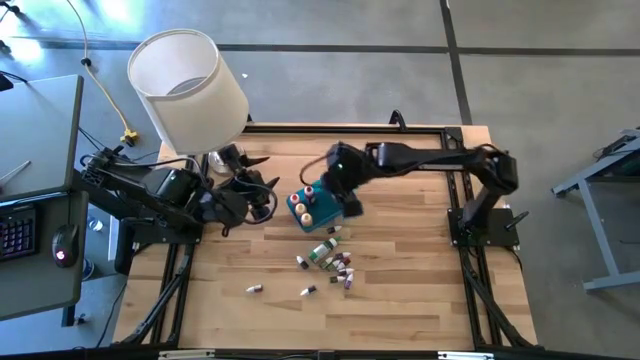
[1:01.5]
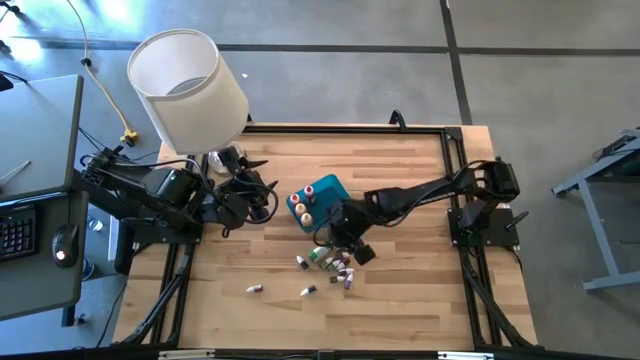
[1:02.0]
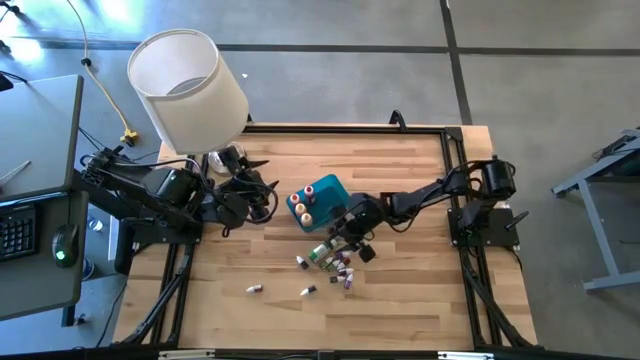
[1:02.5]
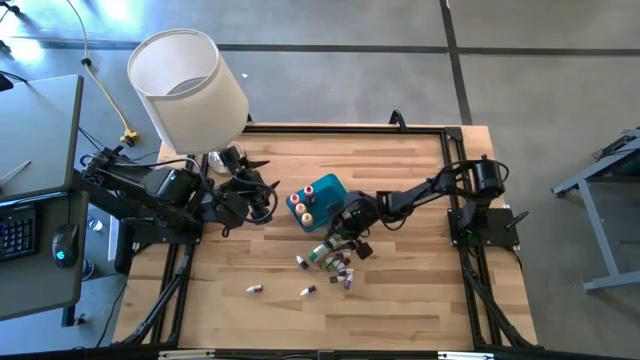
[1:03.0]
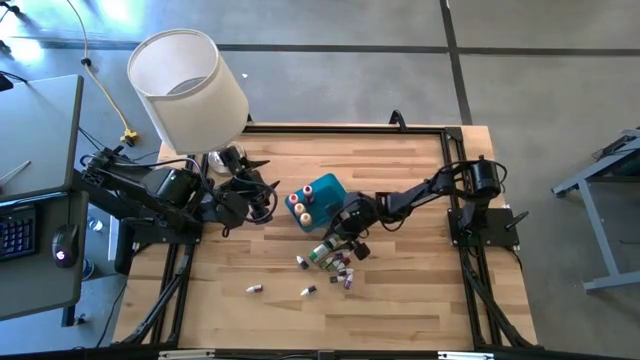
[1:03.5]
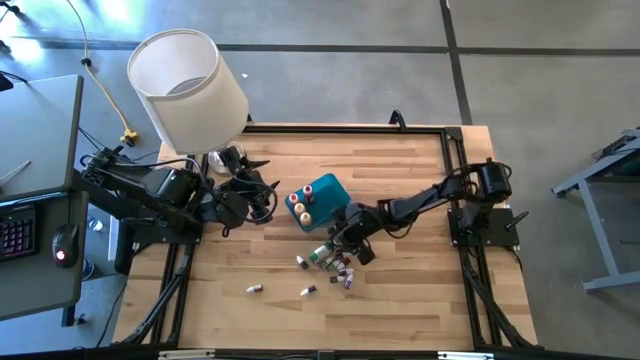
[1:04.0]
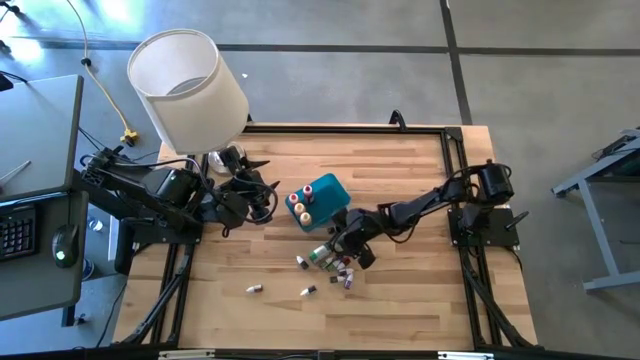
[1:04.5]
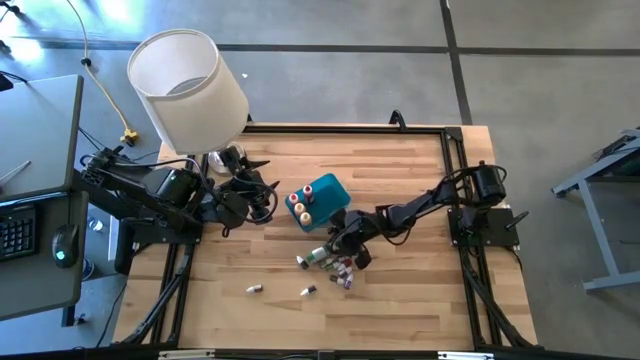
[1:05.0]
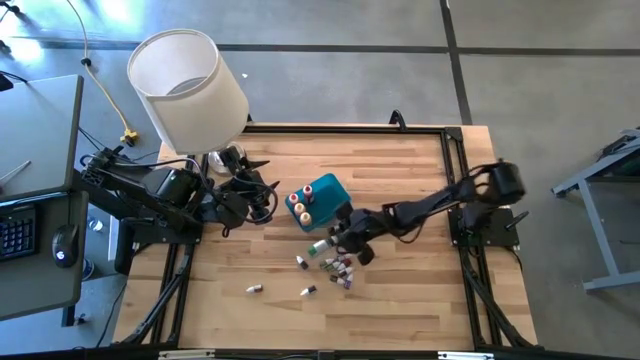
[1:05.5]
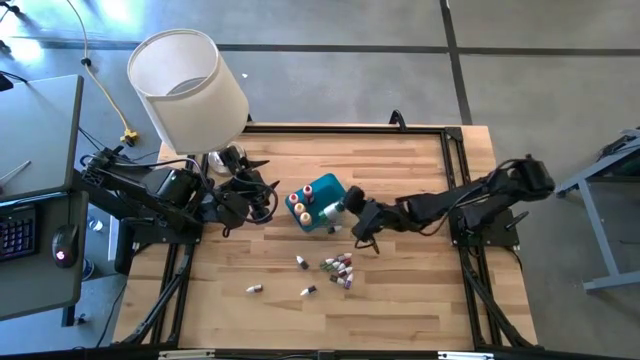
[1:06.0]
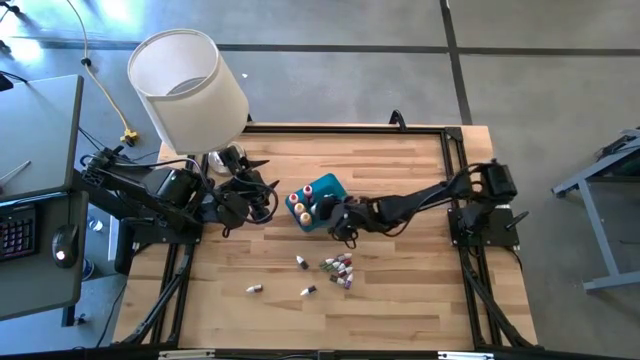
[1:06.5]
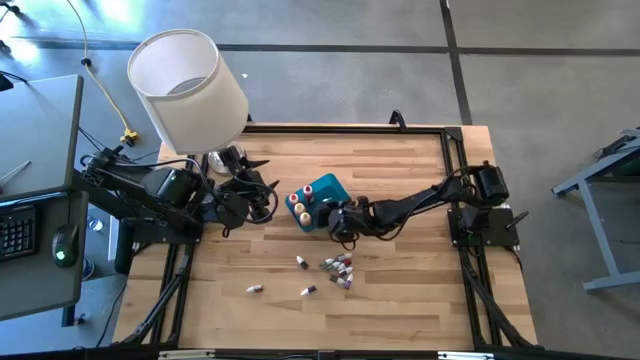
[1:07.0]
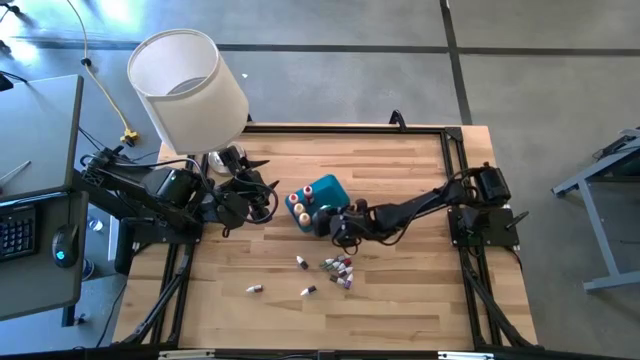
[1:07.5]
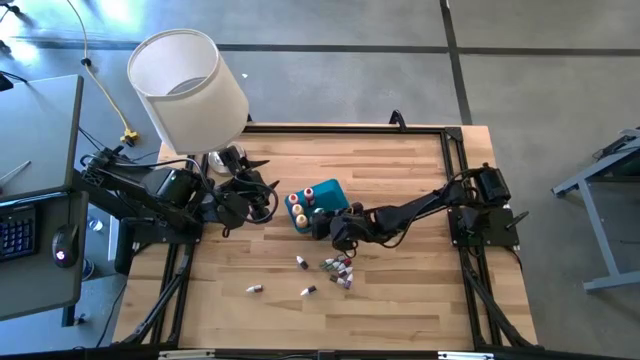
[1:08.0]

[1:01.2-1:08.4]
Task: Pick & Place food coloring
Put the large green food coloring bottle into the bin

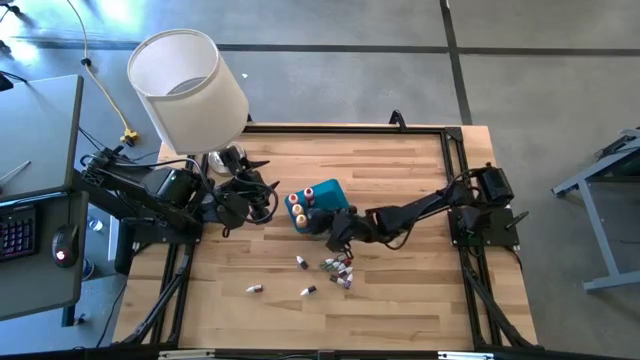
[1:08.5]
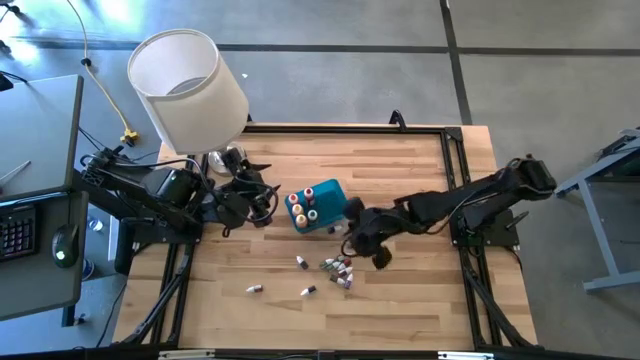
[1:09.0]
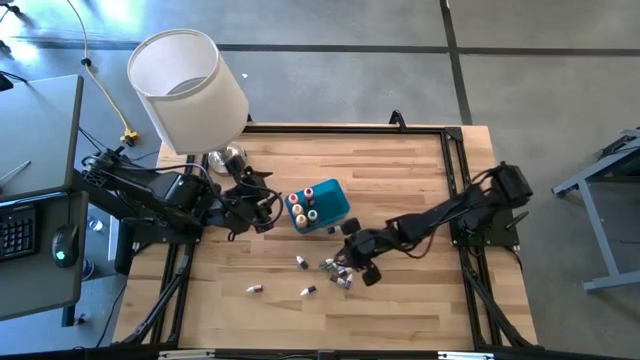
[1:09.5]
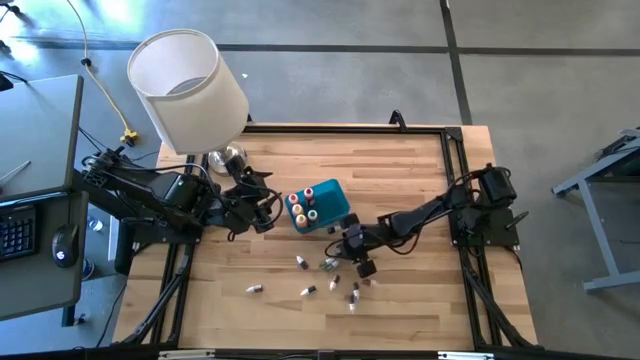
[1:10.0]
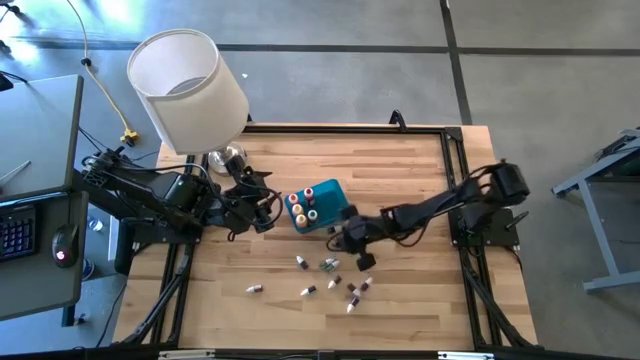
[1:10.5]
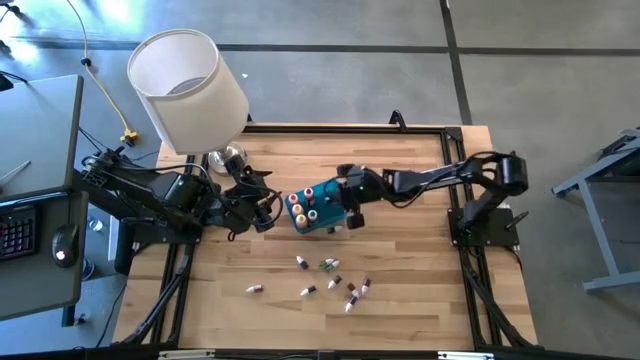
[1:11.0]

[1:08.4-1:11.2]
Put the top small blue food coloring bottle into the bin

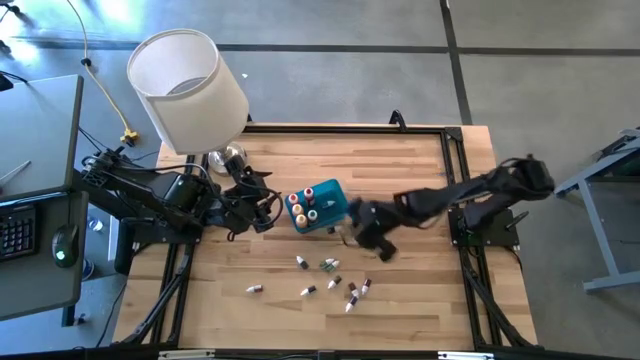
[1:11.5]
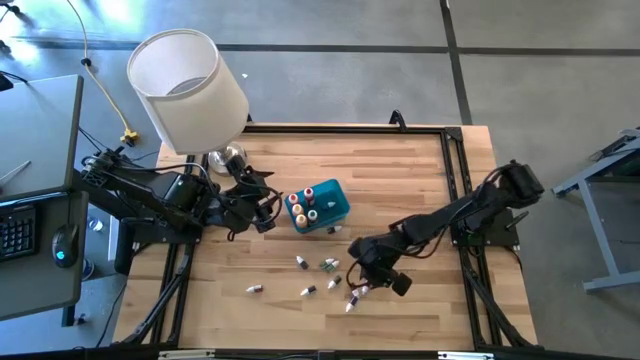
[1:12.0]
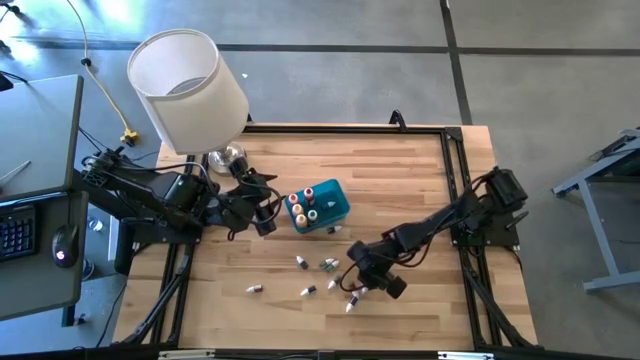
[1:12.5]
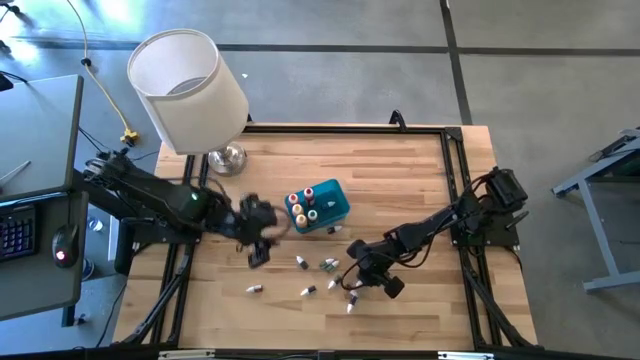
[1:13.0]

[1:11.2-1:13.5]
Put the small red food coloring bottle into the bin

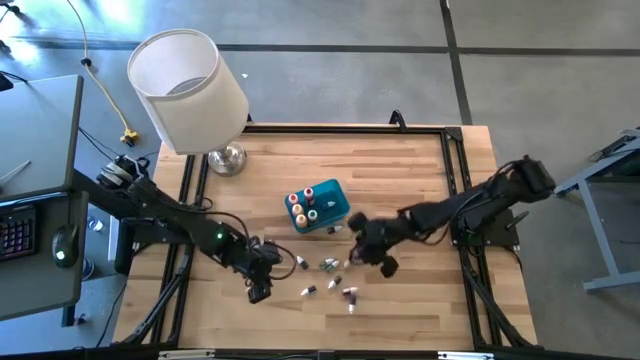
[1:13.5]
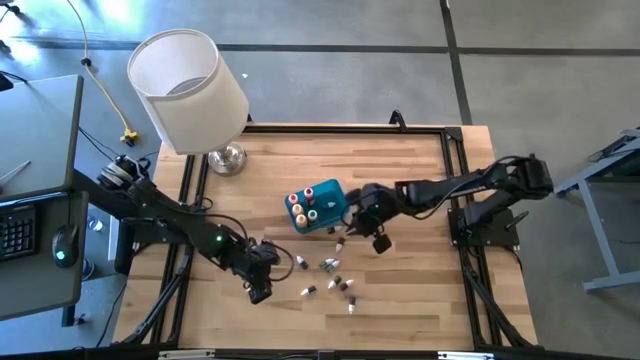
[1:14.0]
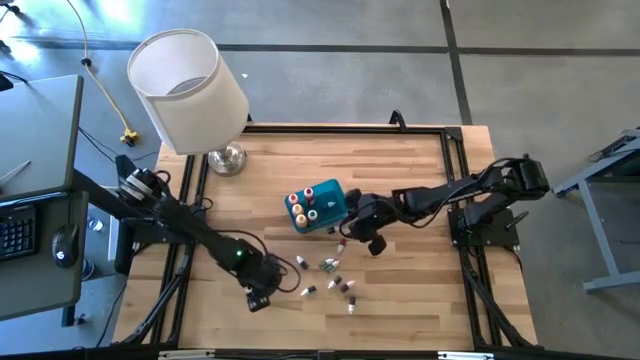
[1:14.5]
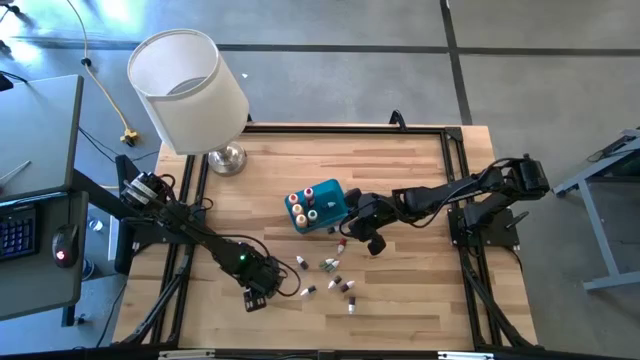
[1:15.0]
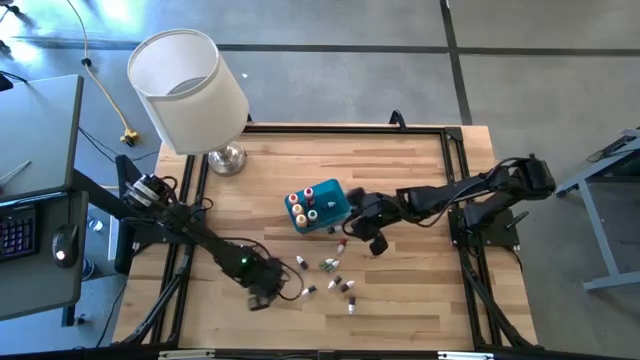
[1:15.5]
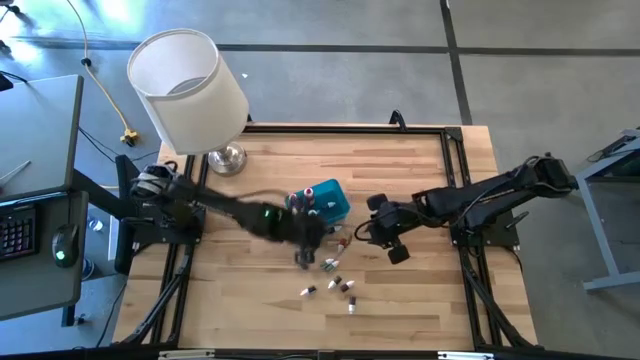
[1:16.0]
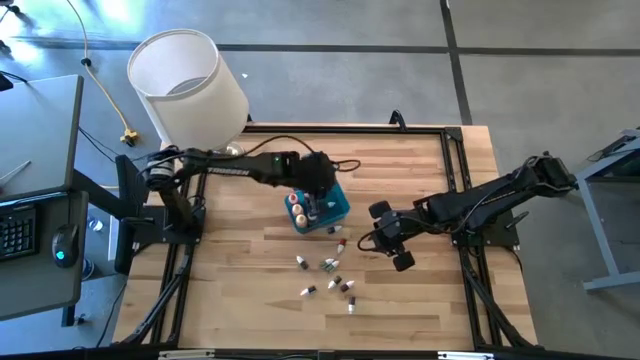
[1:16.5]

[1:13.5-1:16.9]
Put the small red food coloring bottle into the bin

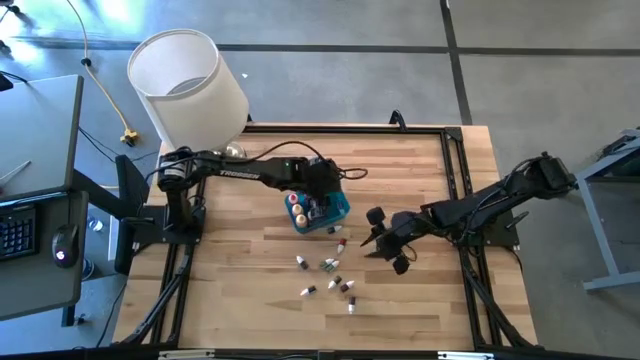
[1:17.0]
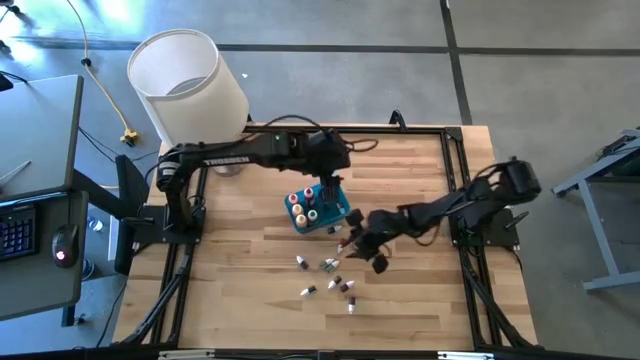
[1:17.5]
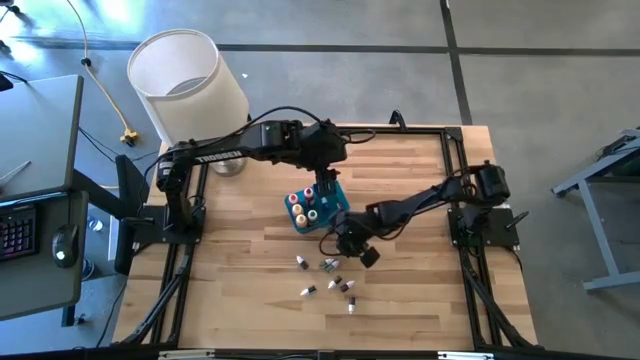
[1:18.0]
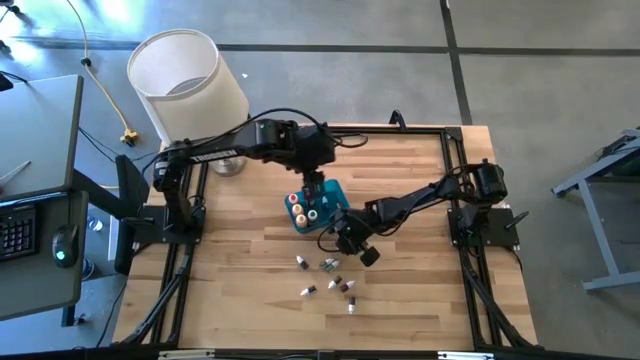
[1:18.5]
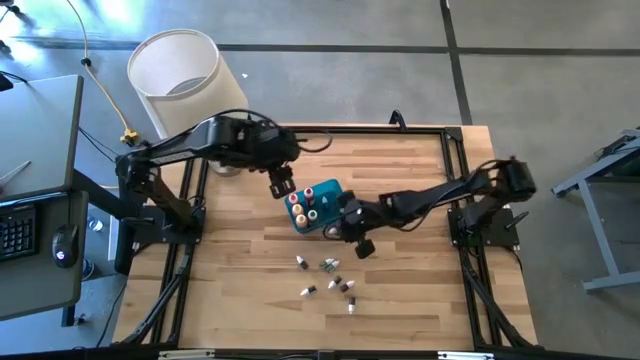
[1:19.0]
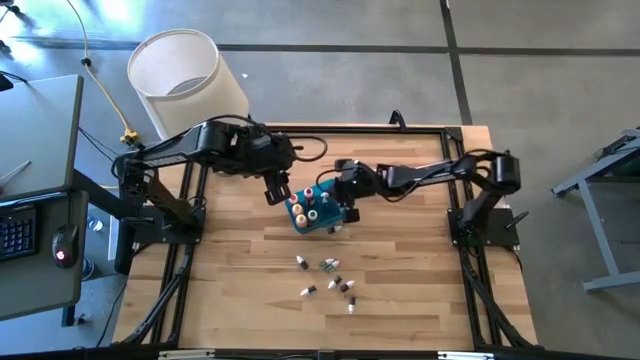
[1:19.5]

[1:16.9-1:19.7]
Put the middle small red food coloring bottle into the bin

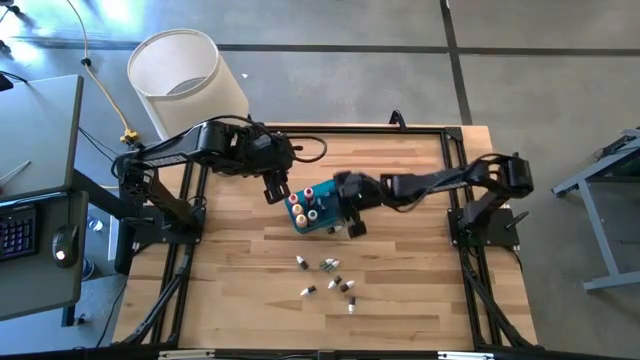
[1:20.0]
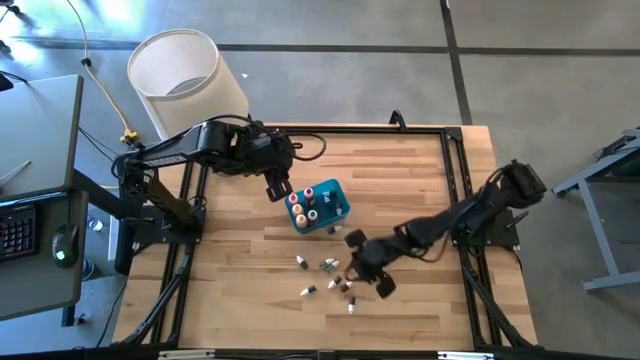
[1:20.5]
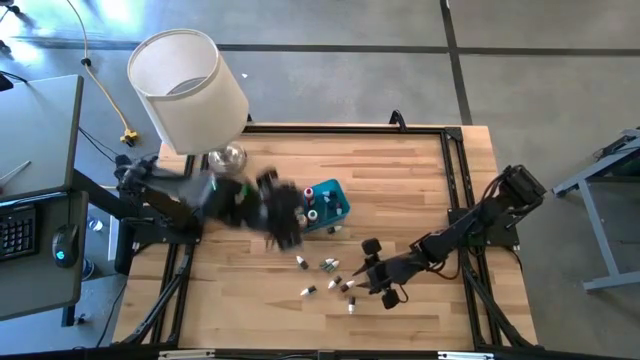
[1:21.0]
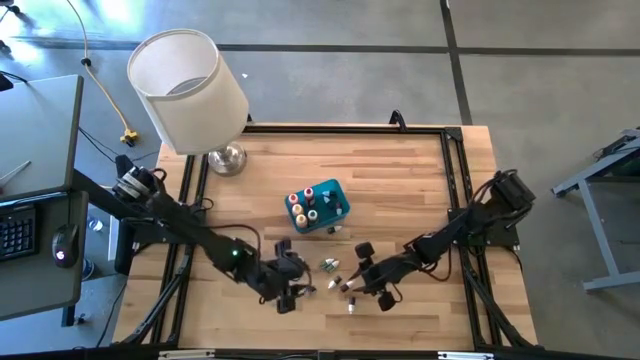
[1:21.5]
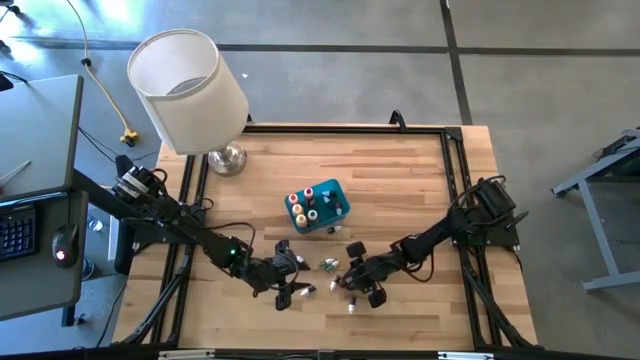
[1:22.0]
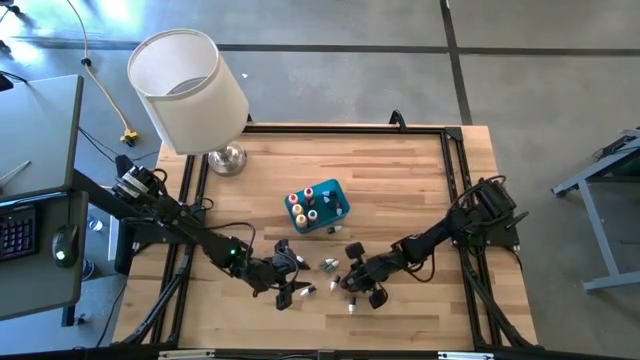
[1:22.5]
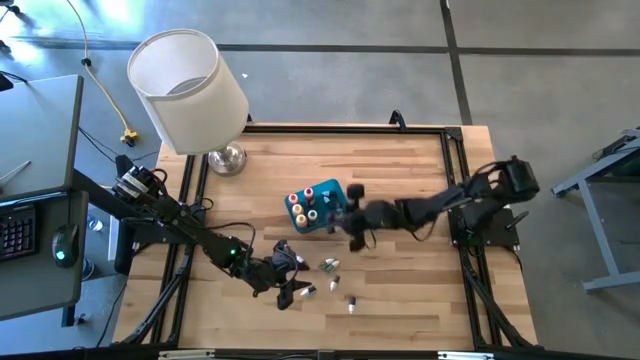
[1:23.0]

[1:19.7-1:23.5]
Put the bottom small red food coloring bottle into the bin
